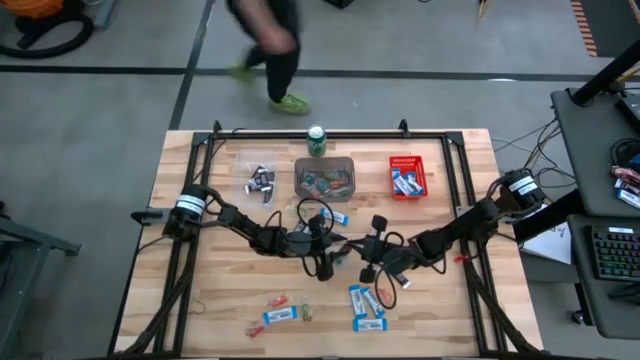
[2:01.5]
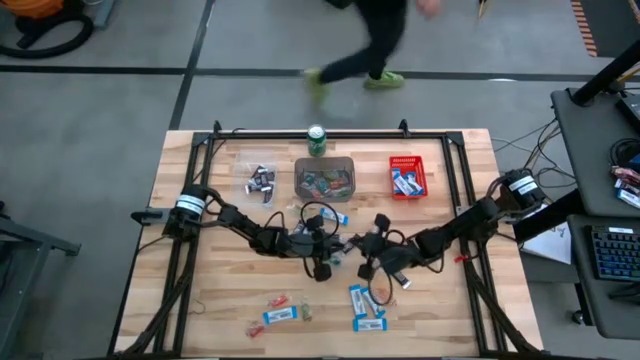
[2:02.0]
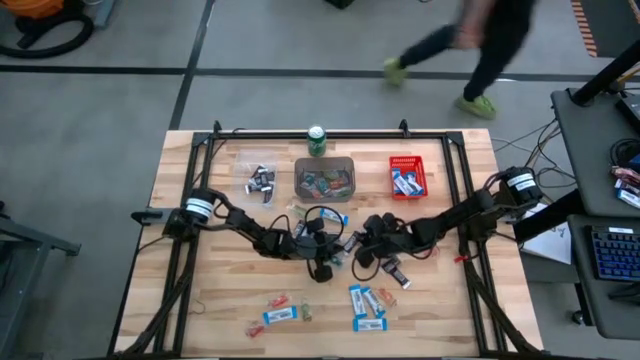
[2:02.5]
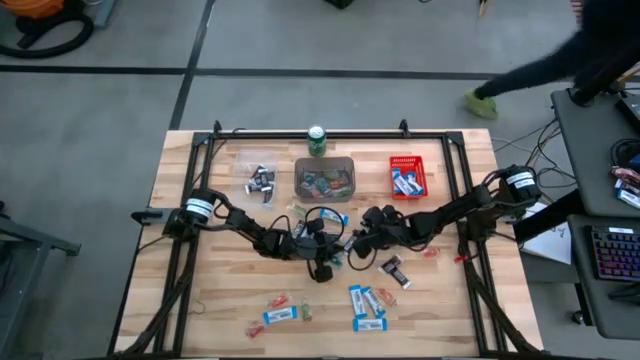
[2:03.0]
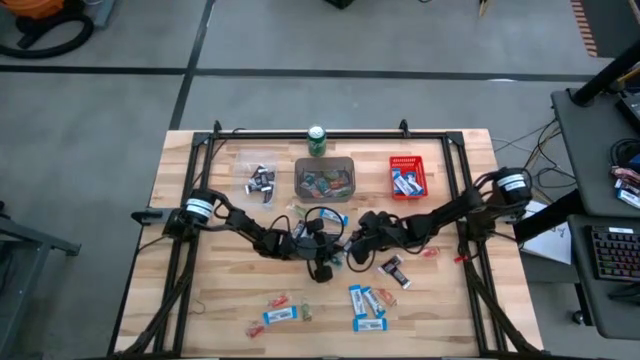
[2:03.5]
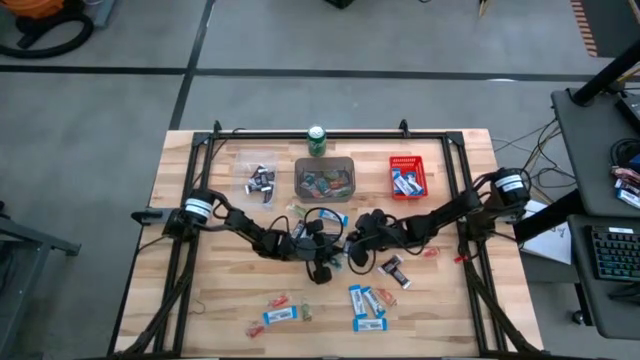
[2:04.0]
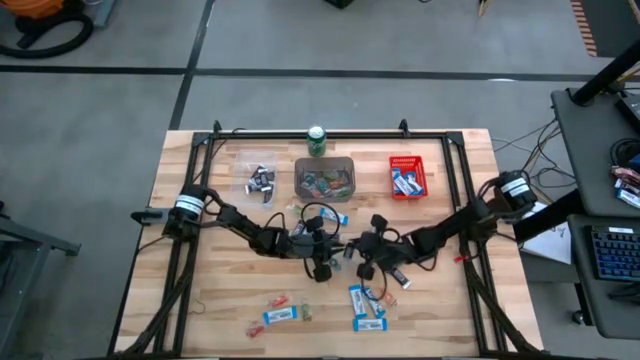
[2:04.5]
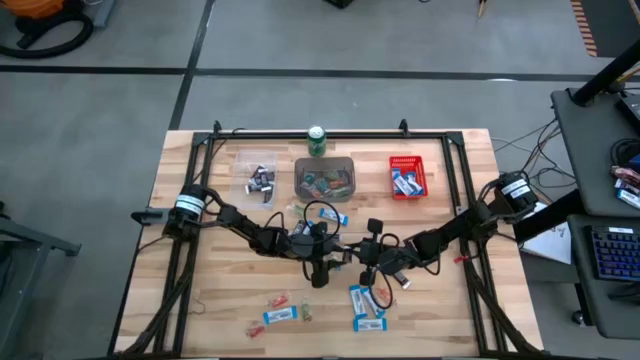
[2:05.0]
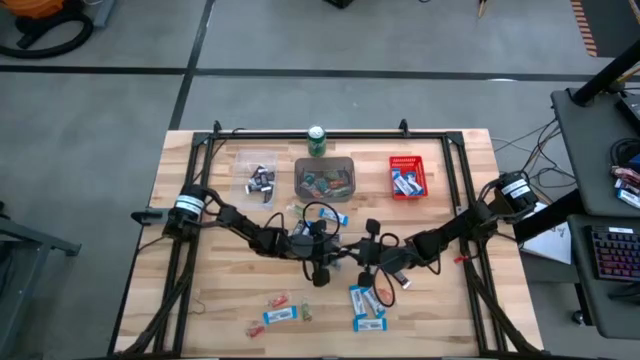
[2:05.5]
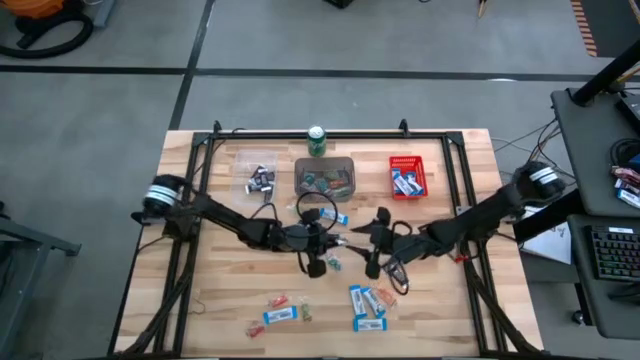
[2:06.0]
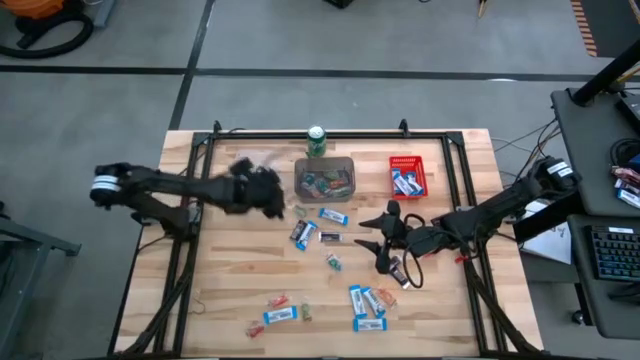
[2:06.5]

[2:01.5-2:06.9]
Task: Organize candy in baskets
Put the brown chocolate bar into the transparent bin

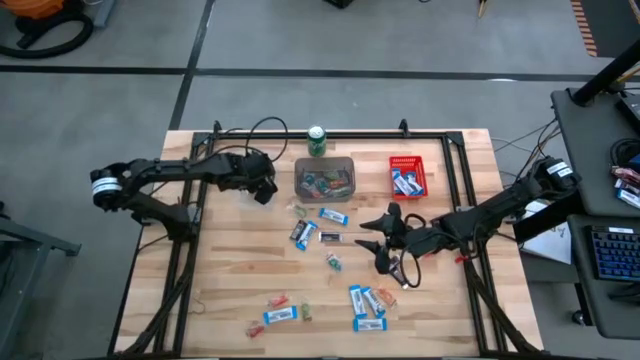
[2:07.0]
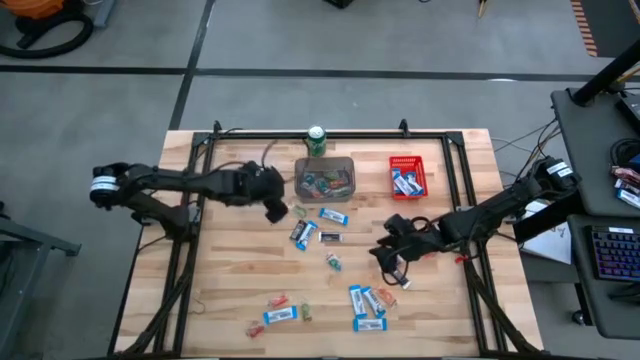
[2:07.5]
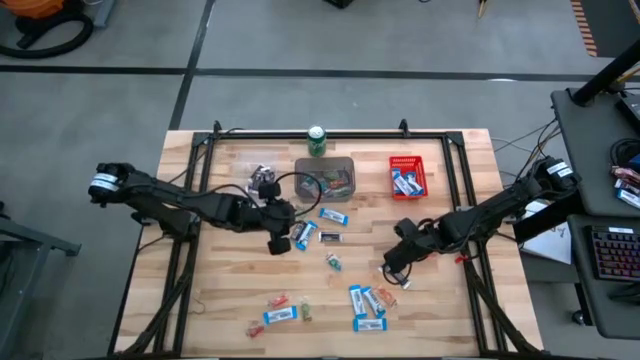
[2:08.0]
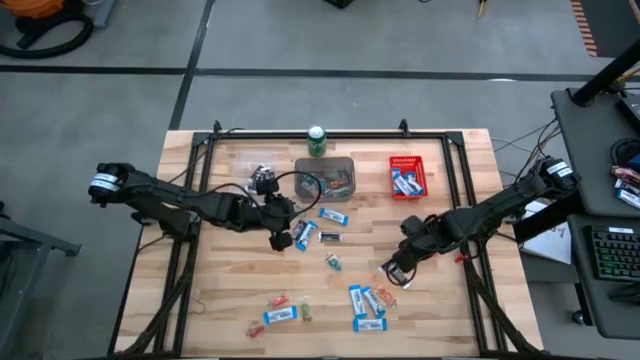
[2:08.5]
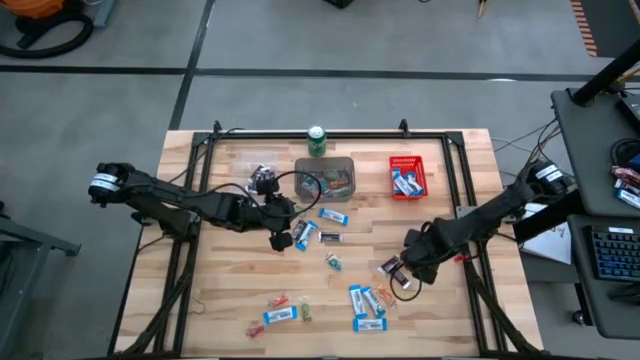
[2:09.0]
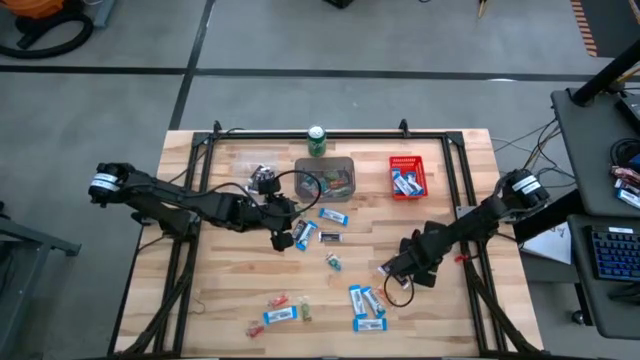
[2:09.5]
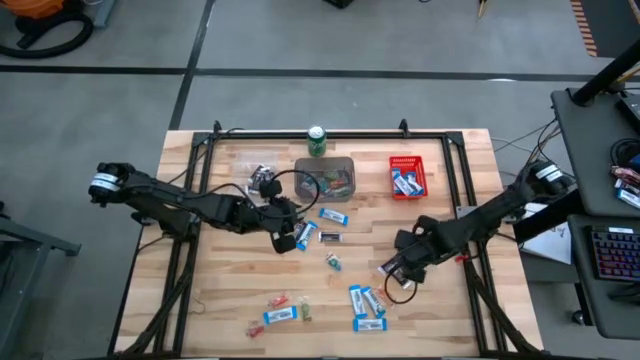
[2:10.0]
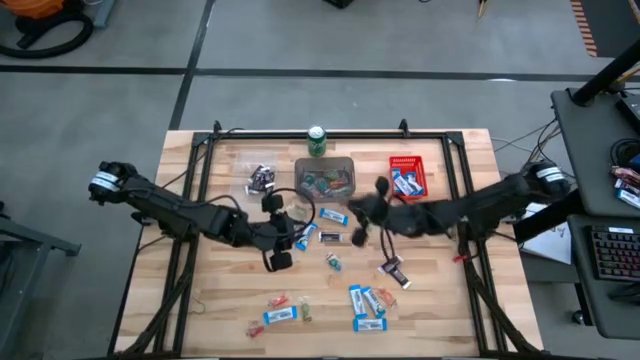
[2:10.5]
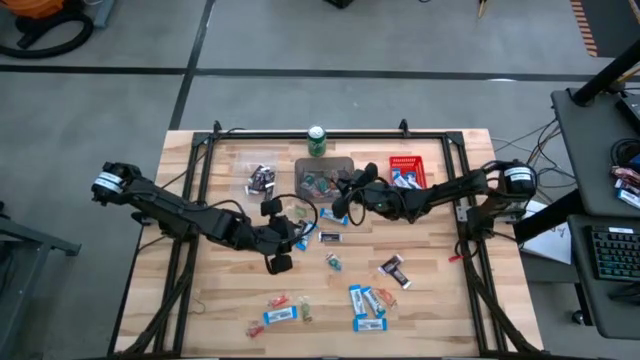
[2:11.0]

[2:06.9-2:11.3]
Put the orange gummy into the black bin

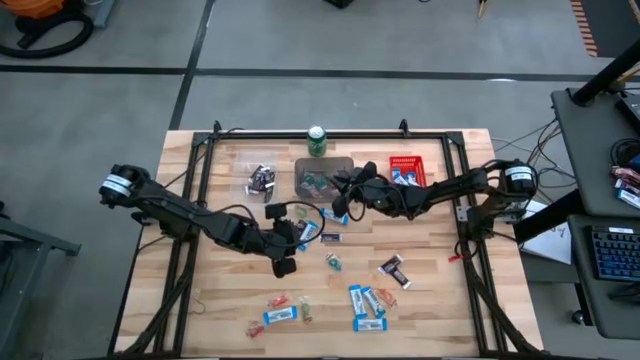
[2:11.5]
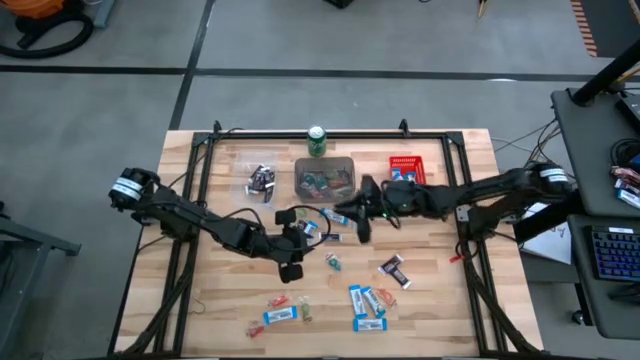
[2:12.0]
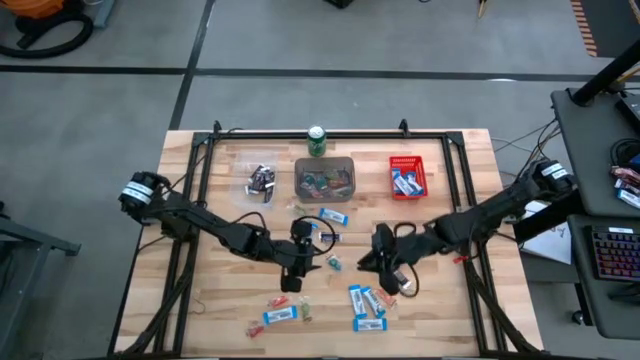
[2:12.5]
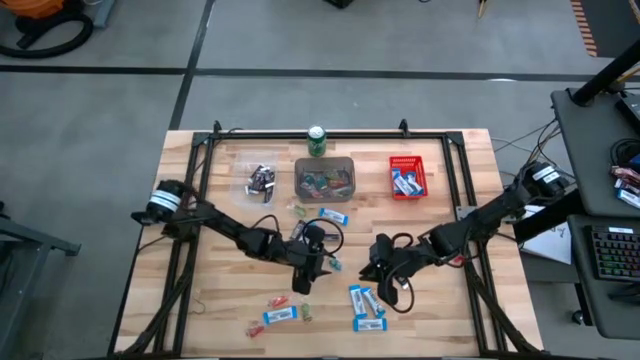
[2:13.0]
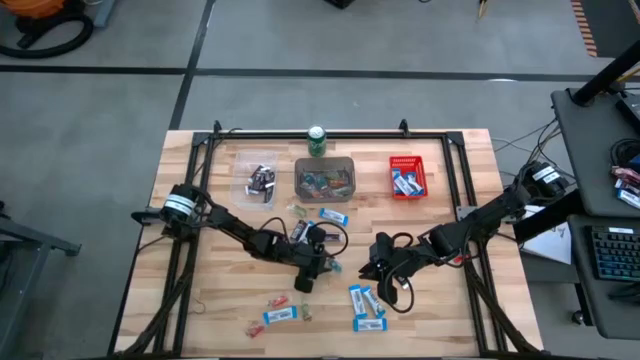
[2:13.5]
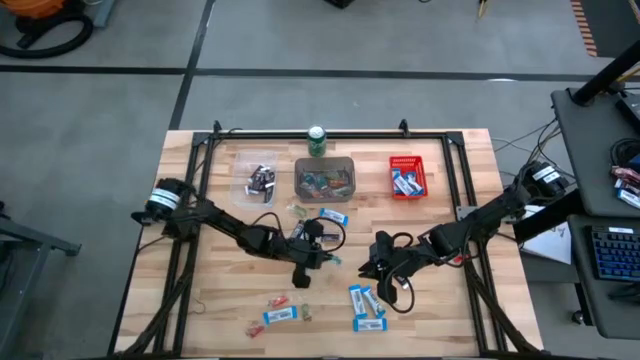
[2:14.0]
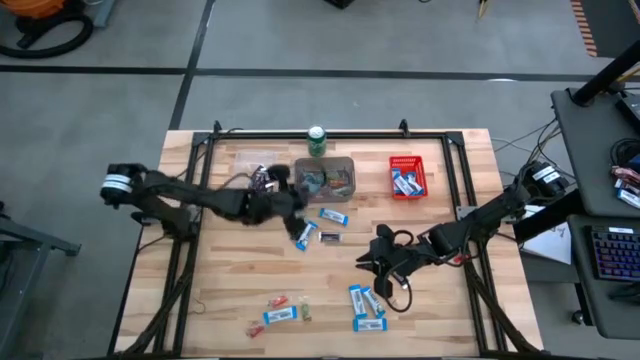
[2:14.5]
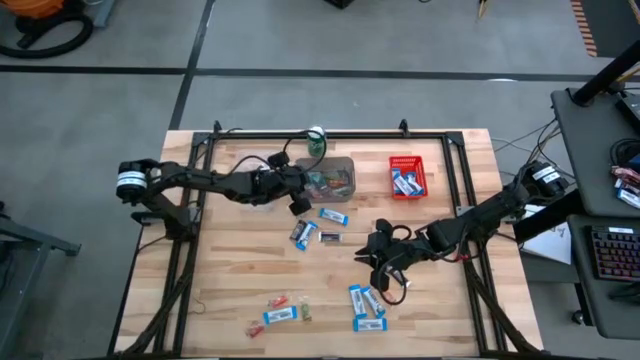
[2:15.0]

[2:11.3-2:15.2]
Put the dark blue gummy into the black bin

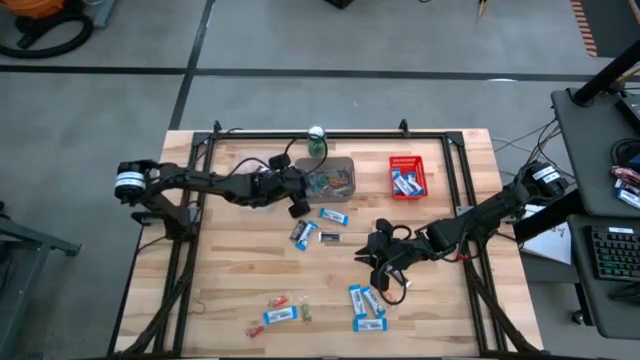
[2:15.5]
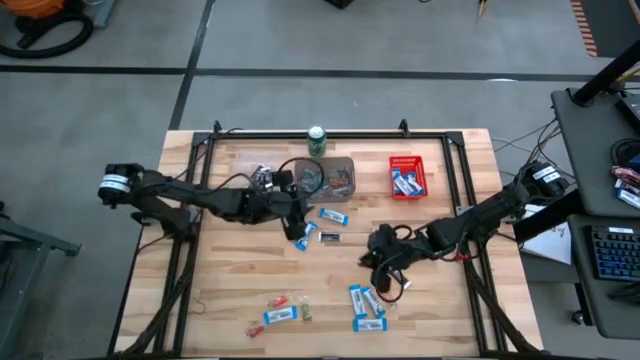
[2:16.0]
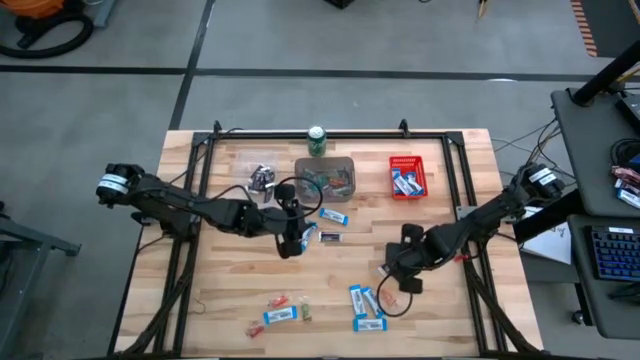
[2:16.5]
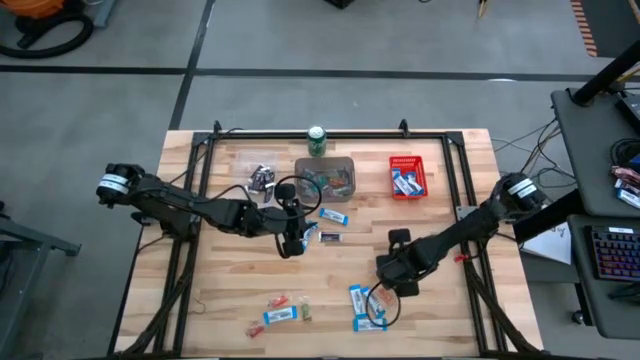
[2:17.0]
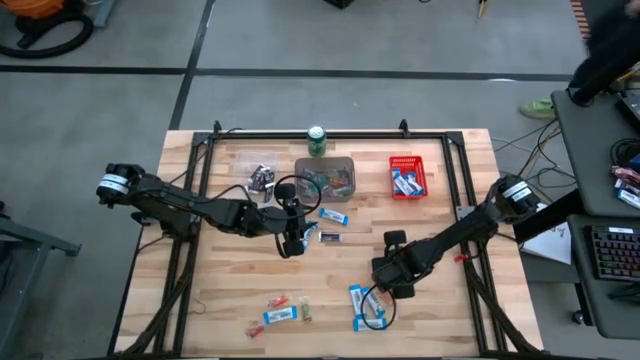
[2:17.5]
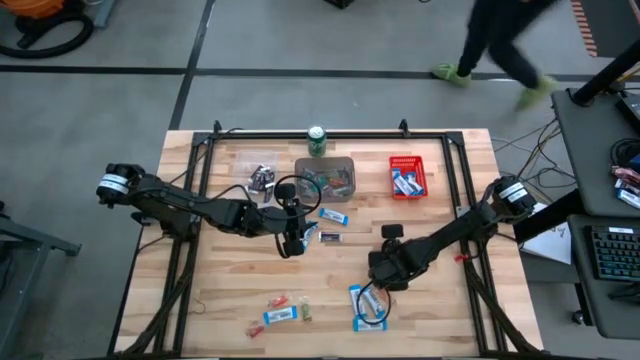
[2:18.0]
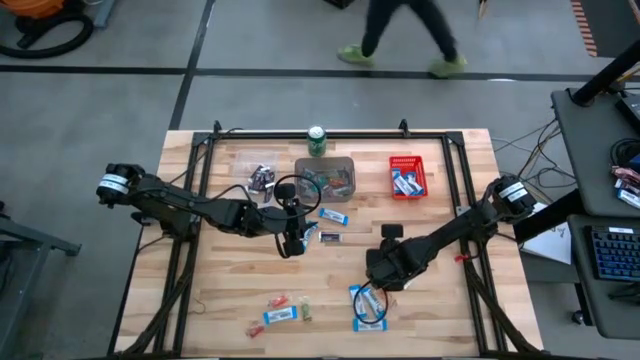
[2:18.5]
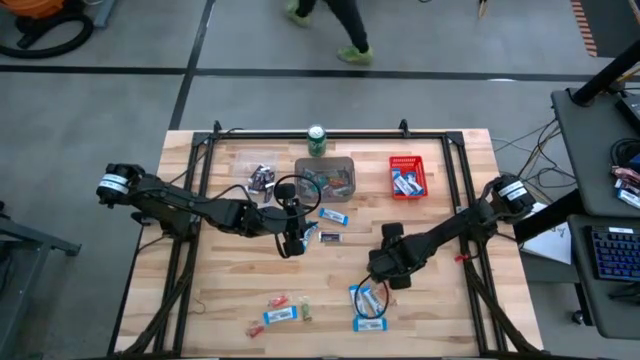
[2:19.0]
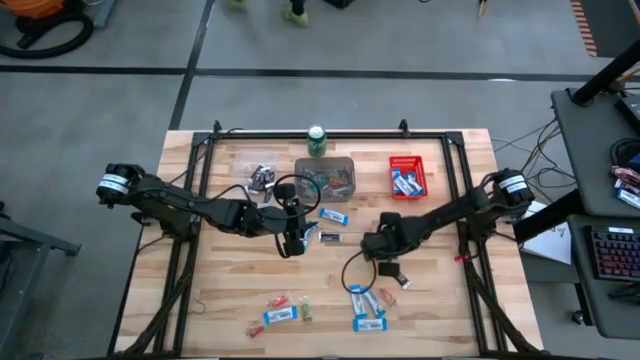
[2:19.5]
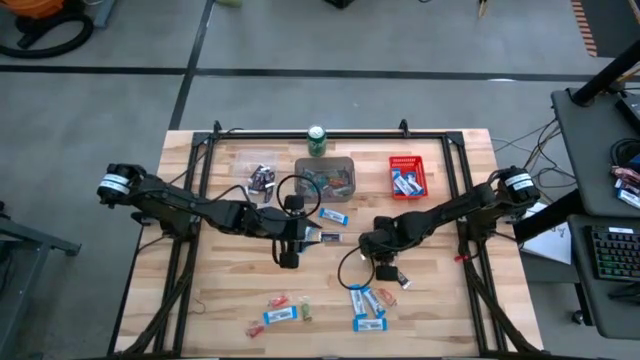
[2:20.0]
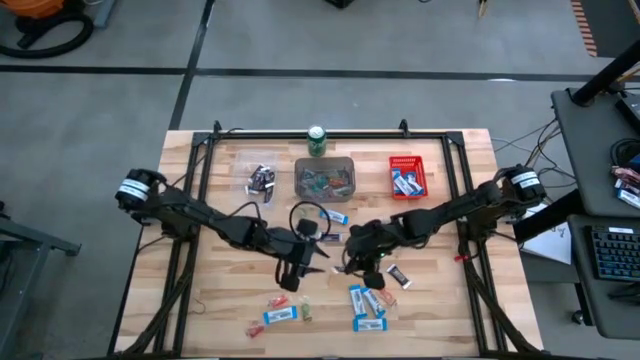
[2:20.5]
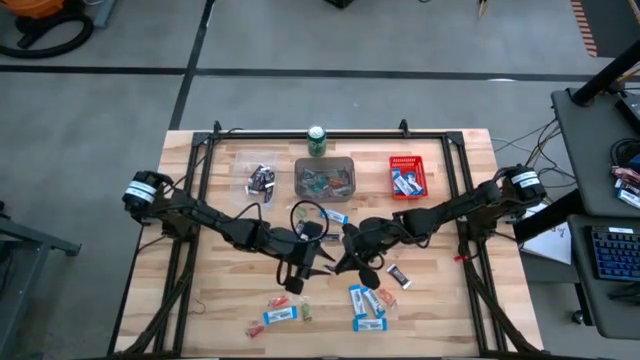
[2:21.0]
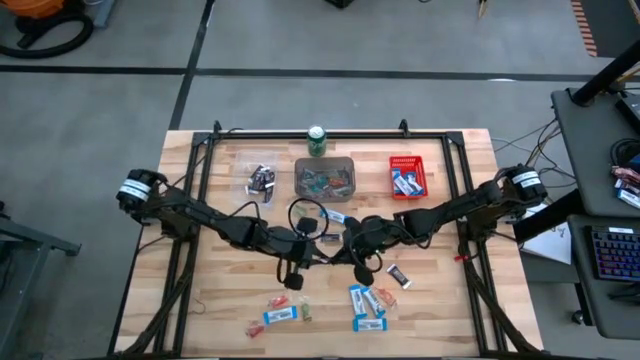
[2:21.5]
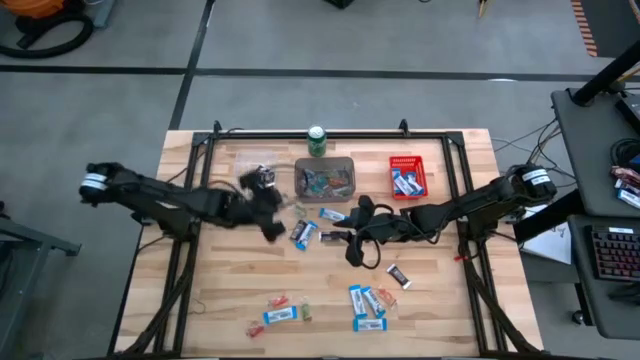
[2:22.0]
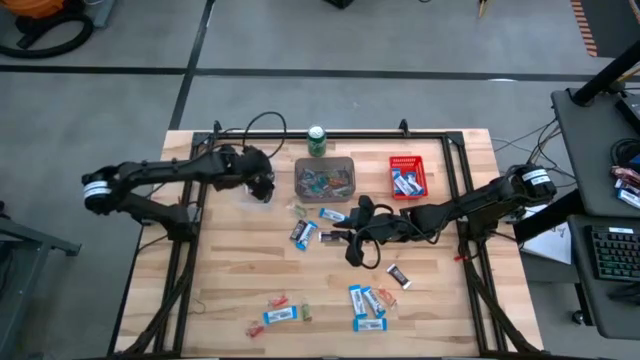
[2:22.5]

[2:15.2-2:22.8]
Put the brown chocolate bar into the transparent bin
